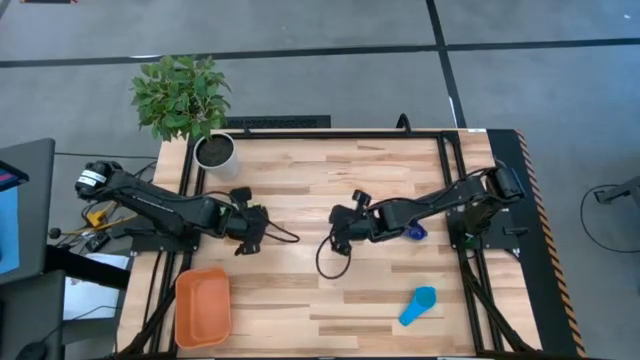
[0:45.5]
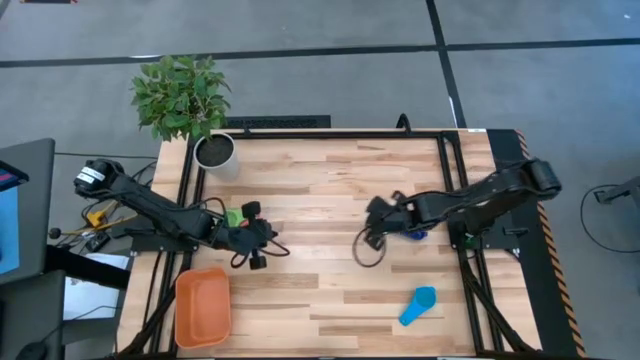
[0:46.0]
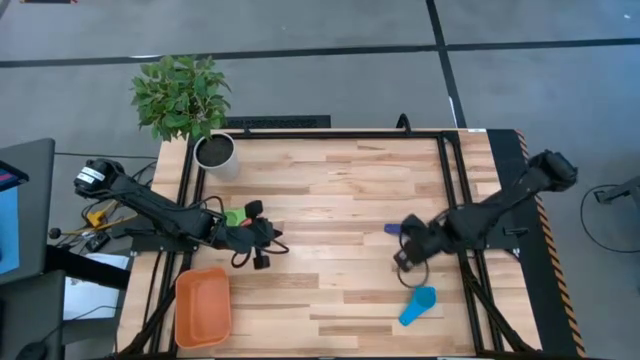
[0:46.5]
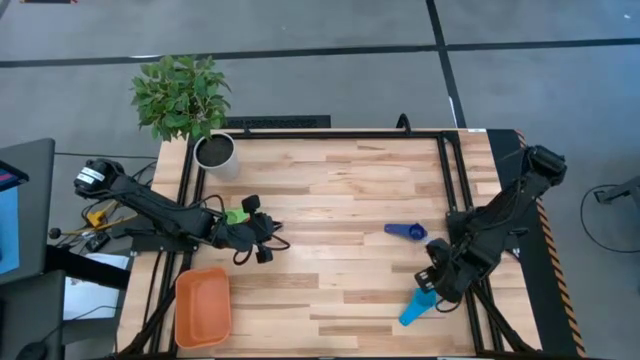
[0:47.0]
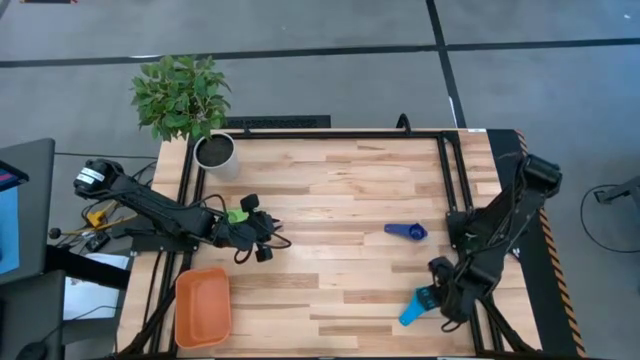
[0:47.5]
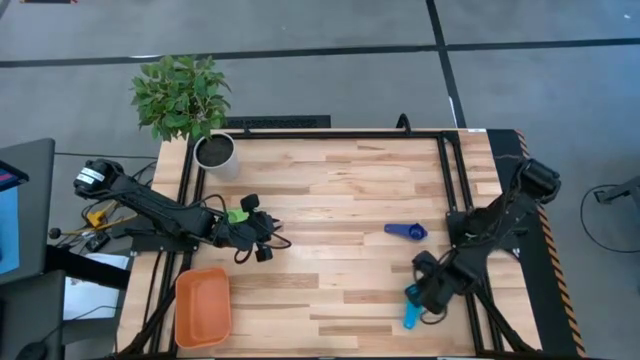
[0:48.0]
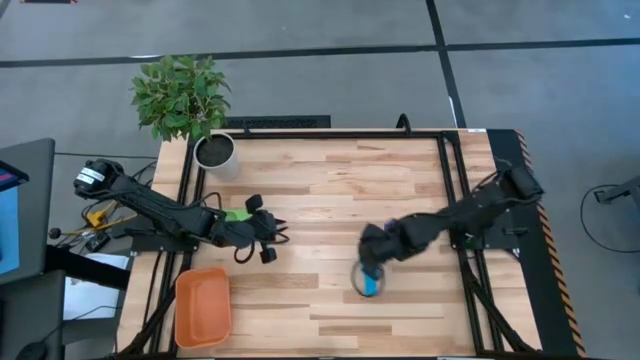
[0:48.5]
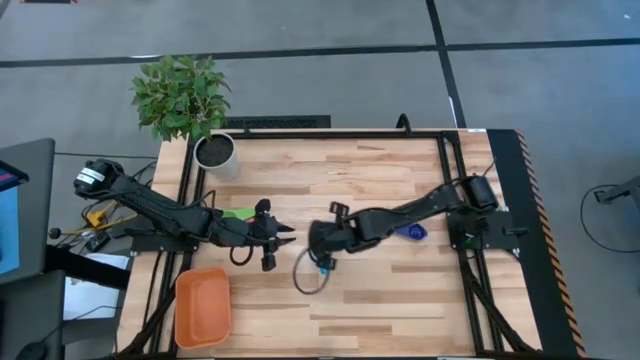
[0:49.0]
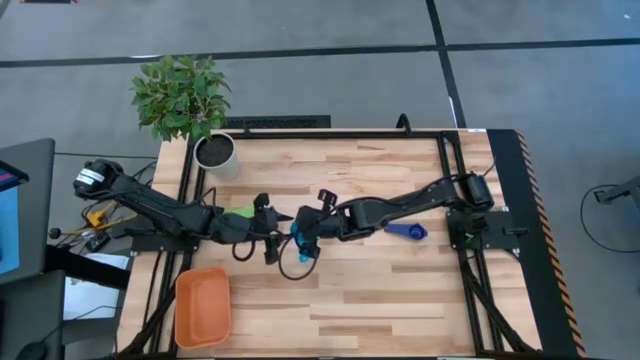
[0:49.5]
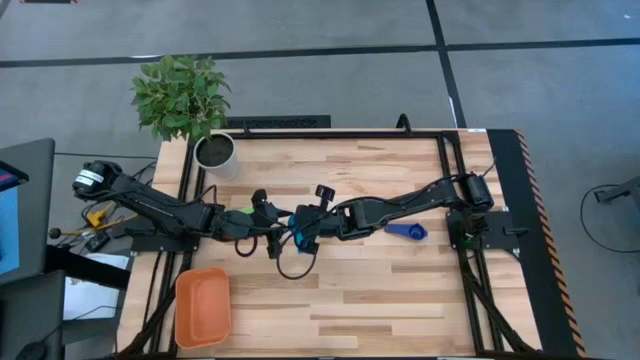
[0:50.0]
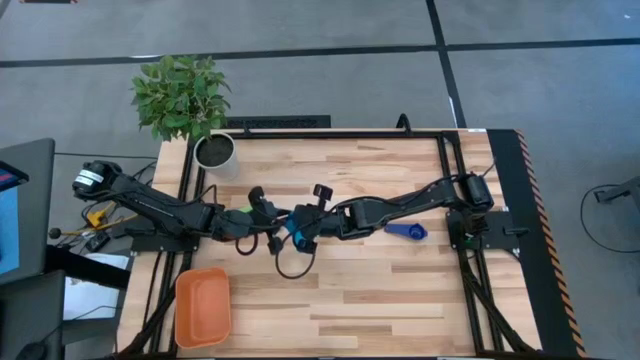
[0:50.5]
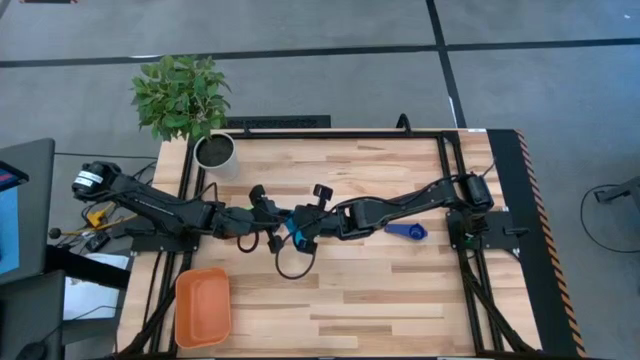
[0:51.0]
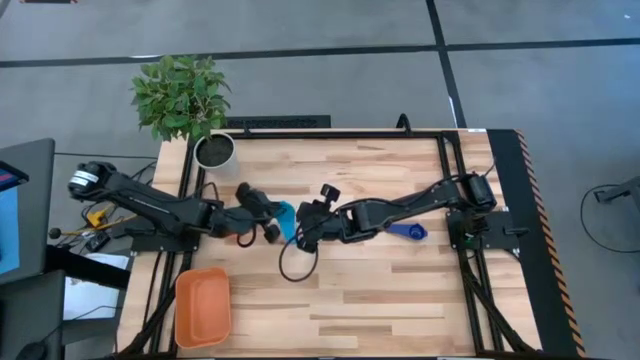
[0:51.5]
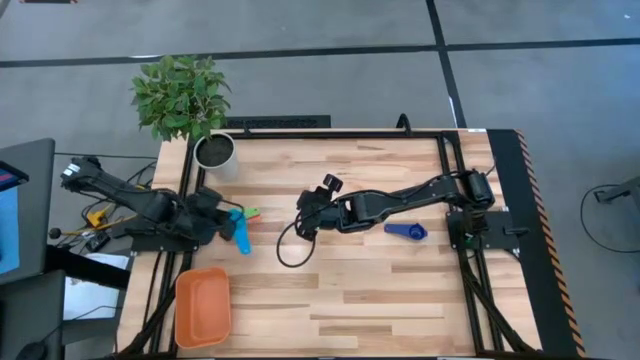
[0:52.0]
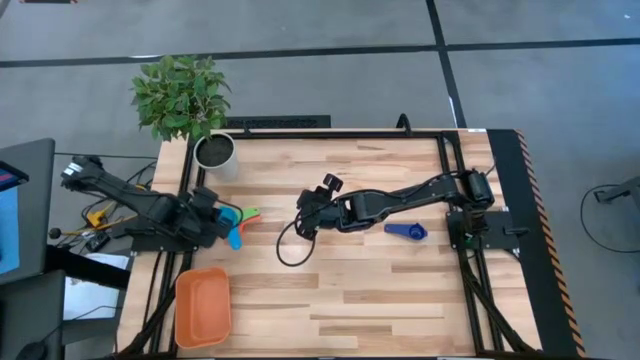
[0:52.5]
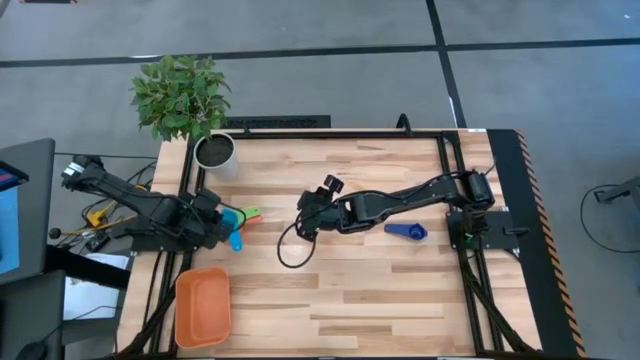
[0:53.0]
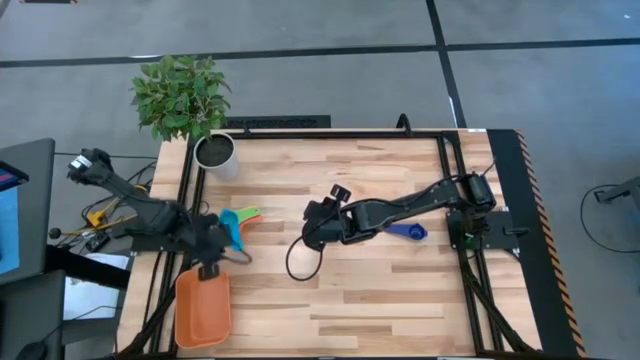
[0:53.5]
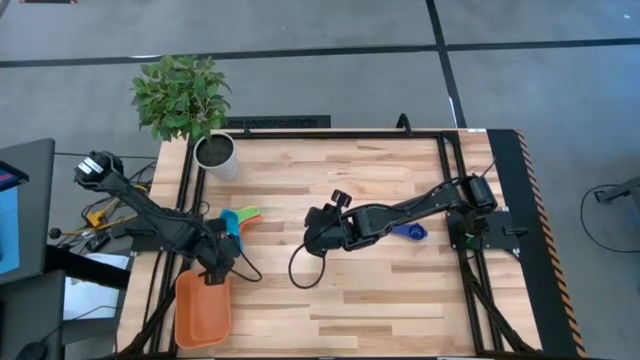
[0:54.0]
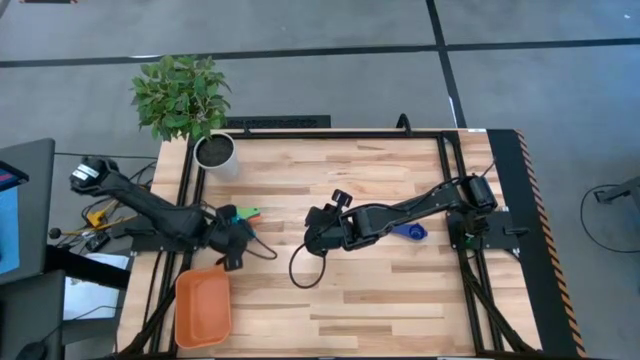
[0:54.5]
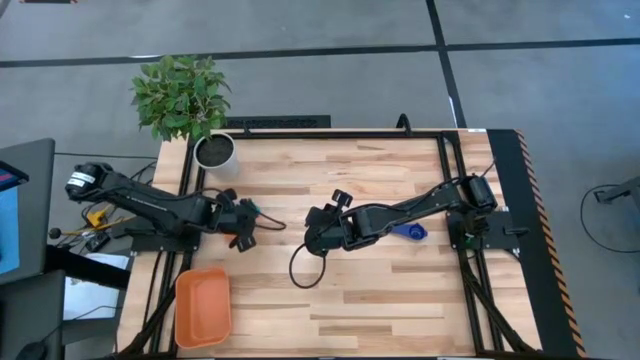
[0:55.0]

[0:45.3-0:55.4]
Task: Nest measuring cups in basket
Stack the light blue measuring cup on top of the green measuring cup

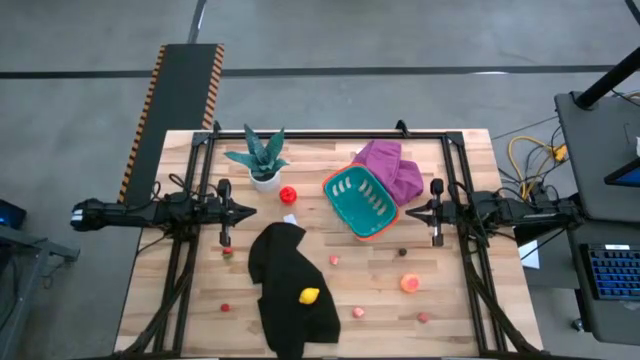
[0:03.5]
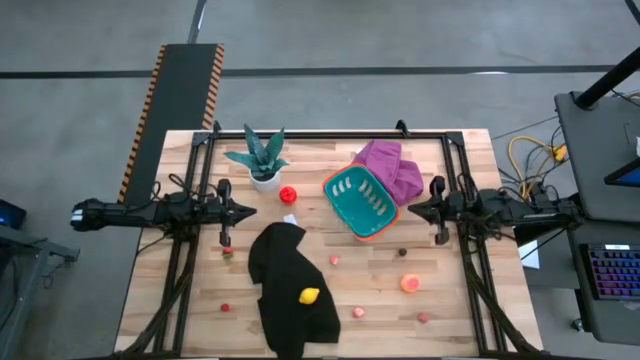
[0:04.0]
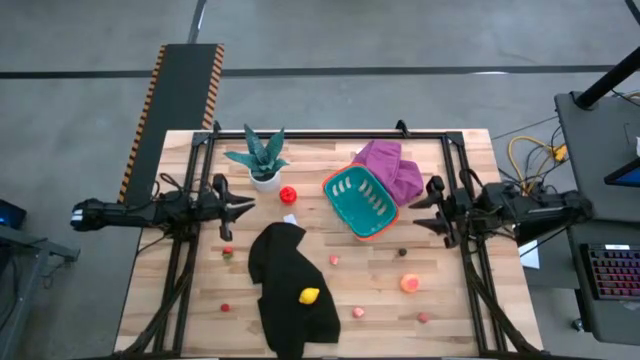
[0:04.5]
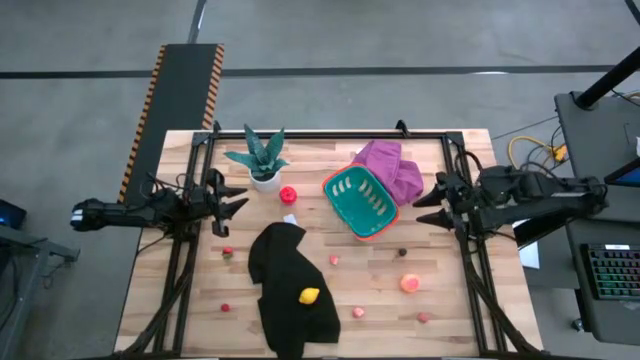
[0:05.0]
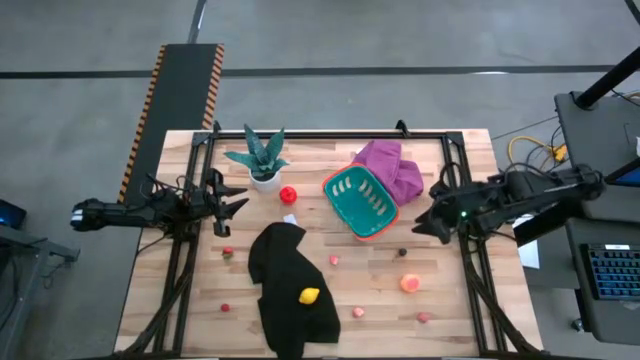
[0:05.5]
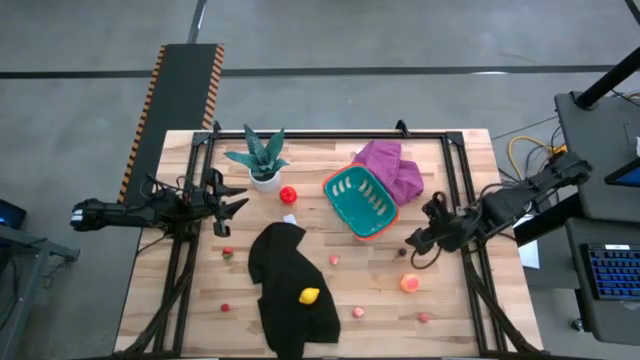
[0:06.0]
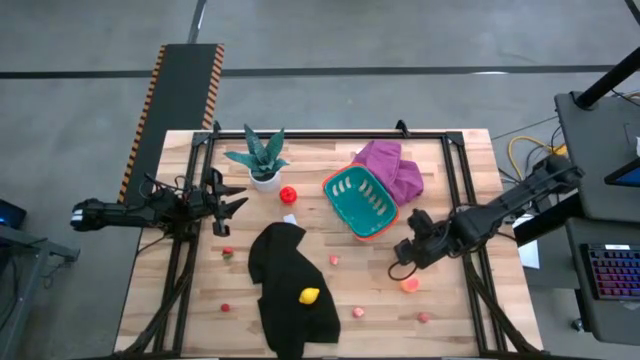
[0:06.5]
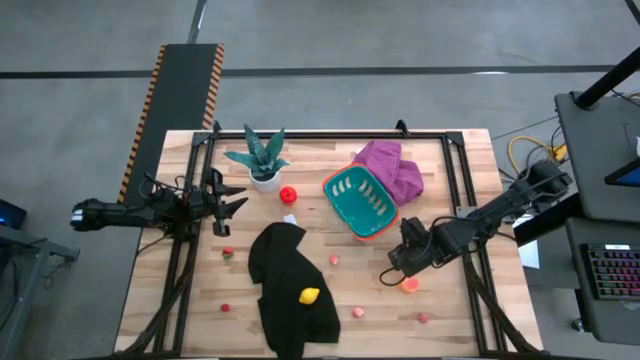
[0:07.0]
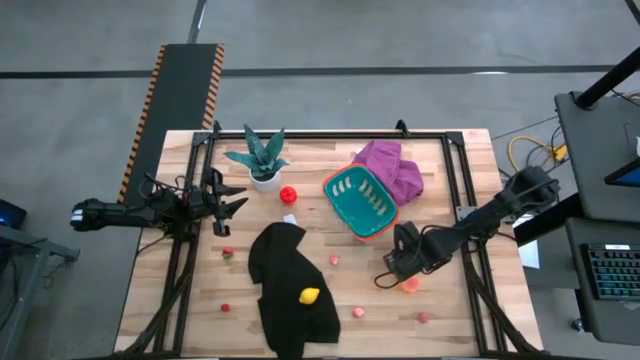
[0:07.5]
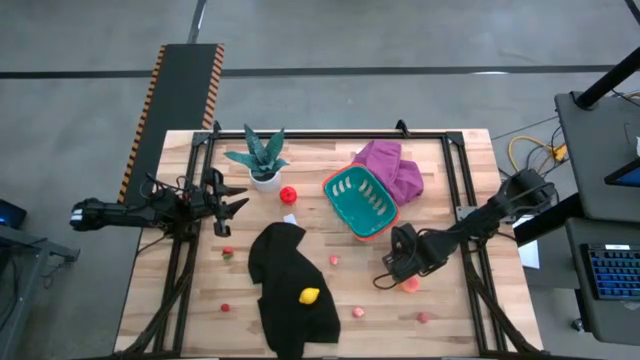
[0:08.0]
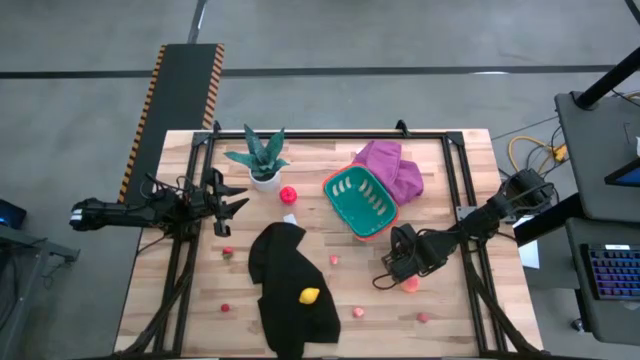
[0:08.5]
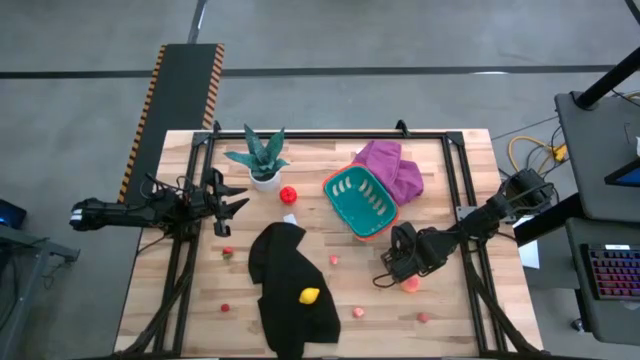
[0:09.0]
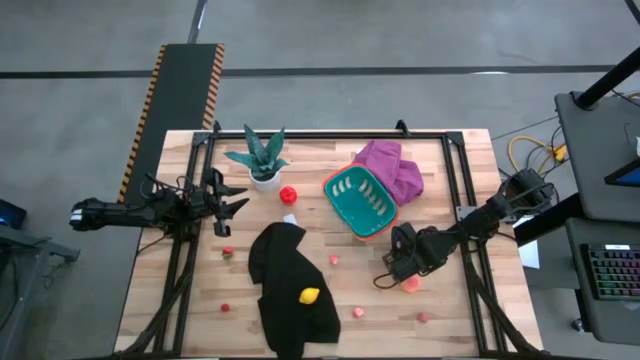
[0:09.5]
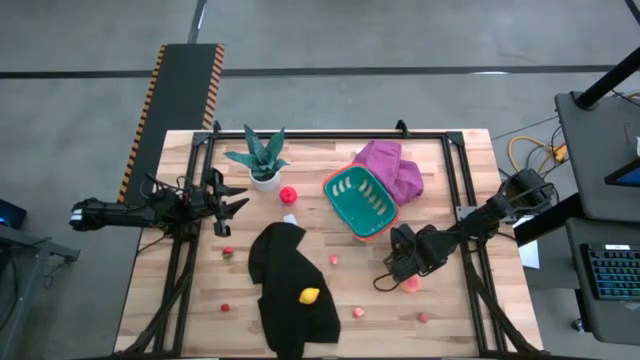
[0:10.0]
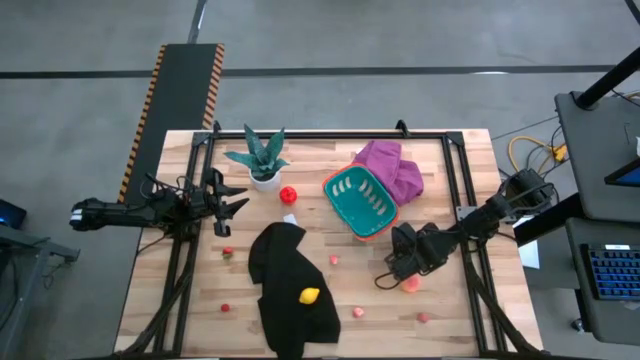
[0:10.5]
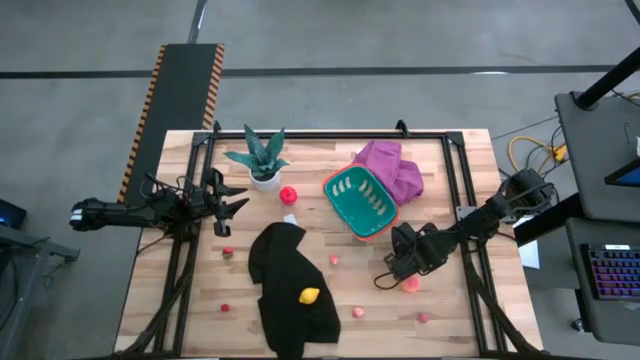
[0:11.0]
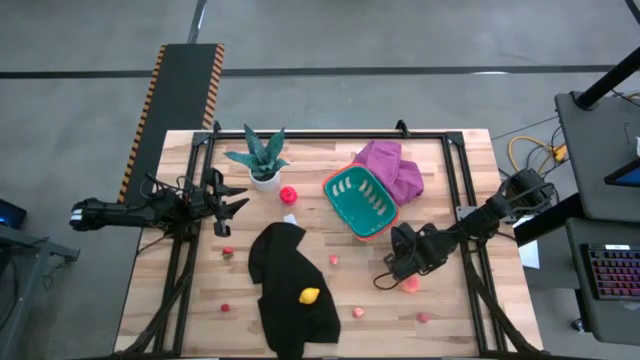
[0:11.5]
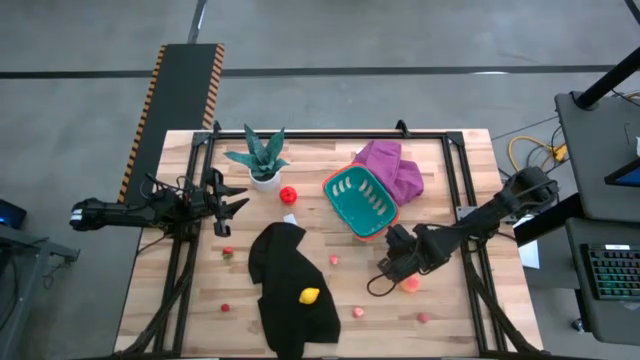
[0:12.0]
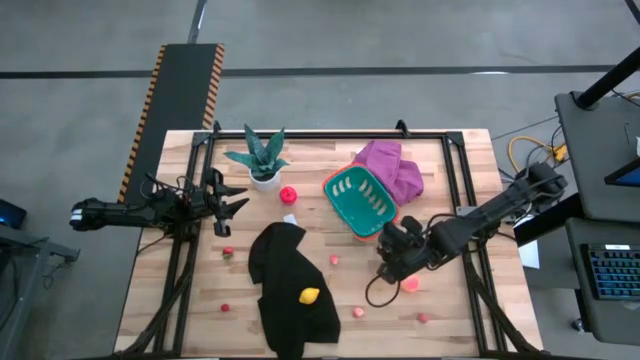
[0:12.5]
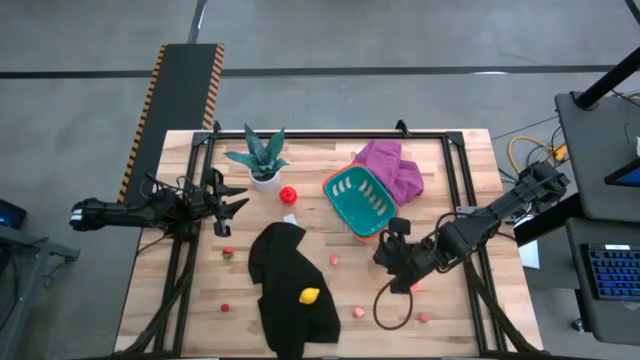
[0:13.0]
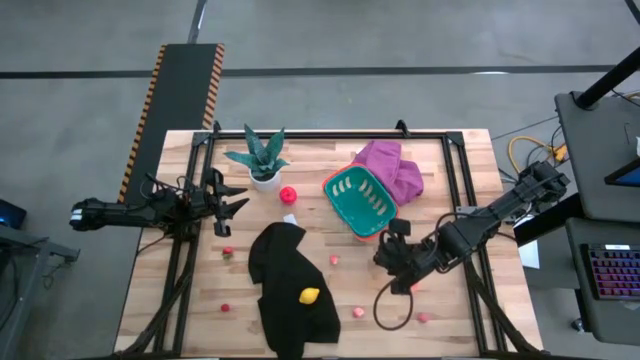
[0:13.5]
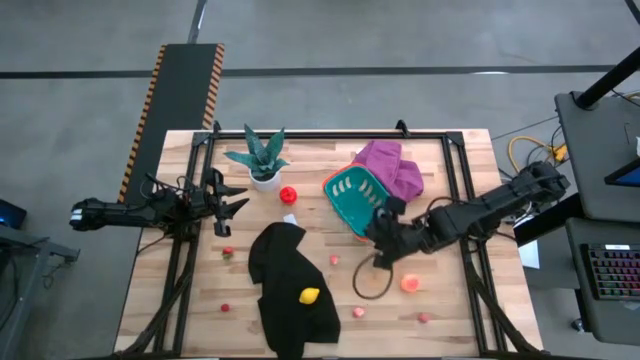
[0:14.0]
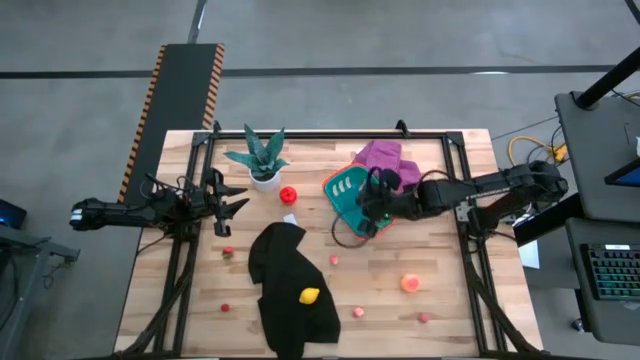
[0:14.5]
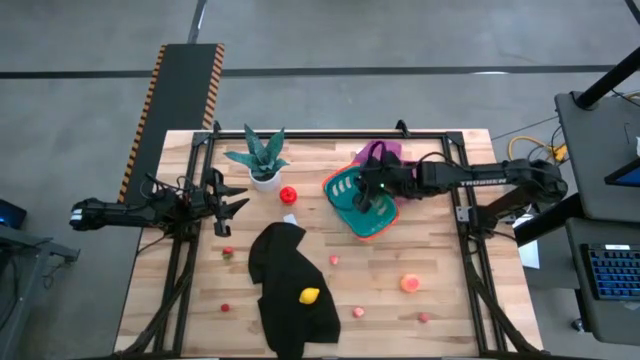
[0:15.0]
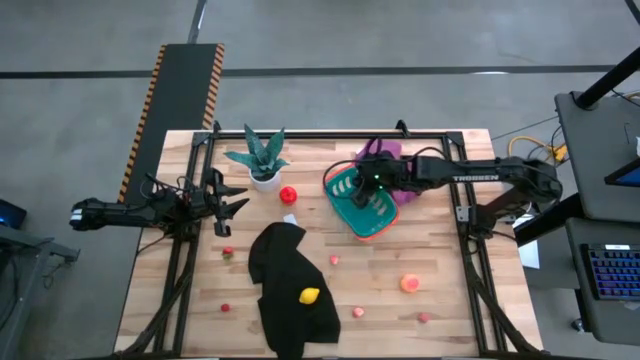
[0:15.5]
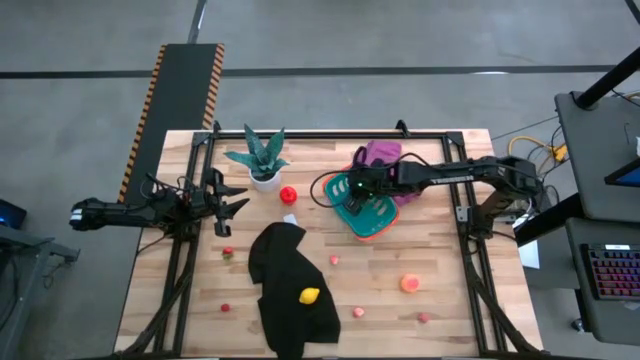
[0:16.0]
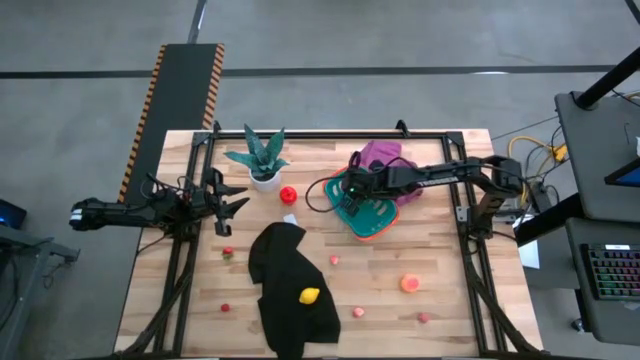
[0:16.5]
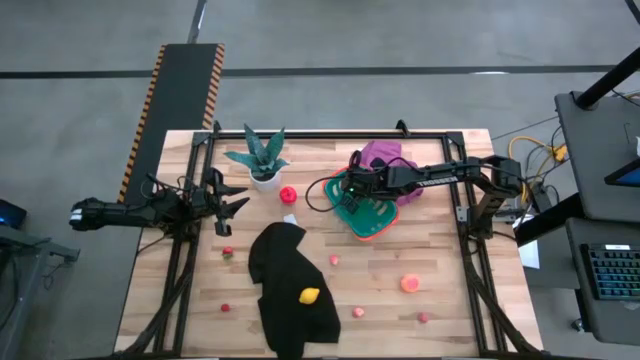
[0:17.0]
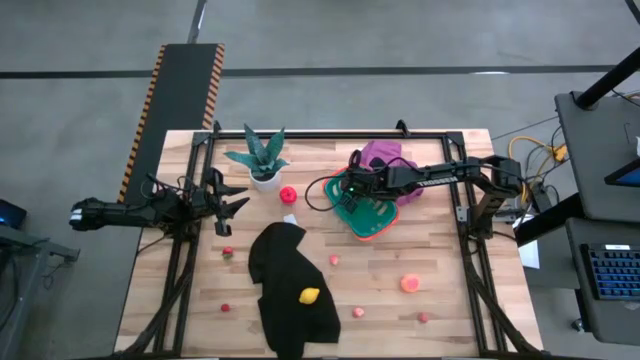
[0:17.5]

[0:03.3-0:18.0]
Task: Pick and placing Produce into tupperware
Put the cherry into the green basket
